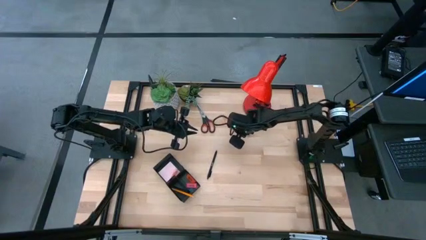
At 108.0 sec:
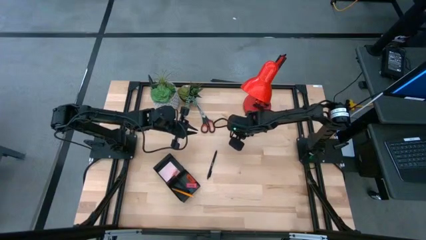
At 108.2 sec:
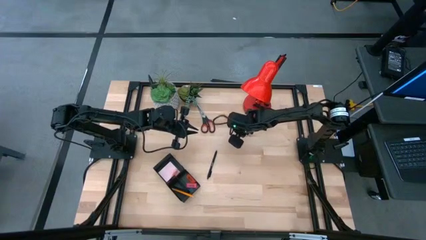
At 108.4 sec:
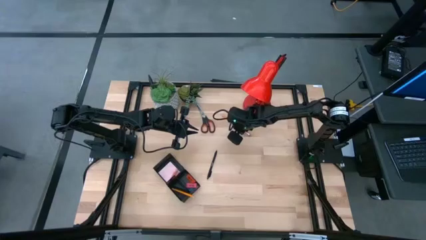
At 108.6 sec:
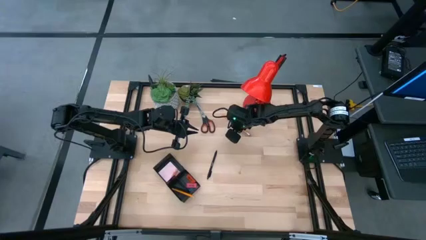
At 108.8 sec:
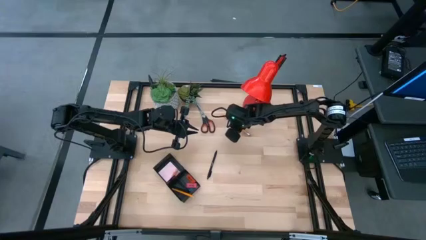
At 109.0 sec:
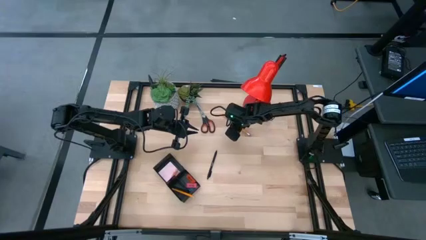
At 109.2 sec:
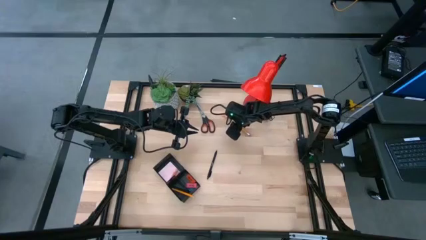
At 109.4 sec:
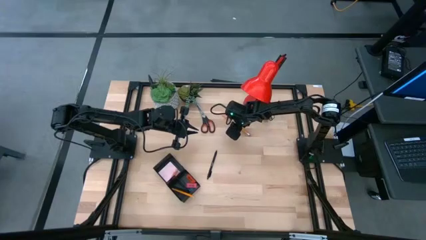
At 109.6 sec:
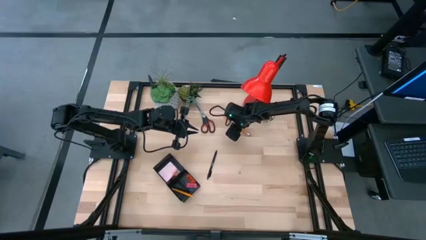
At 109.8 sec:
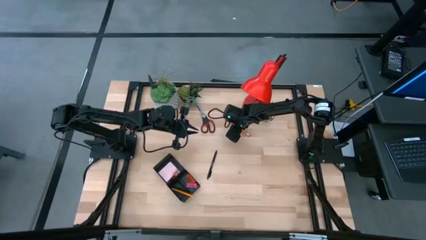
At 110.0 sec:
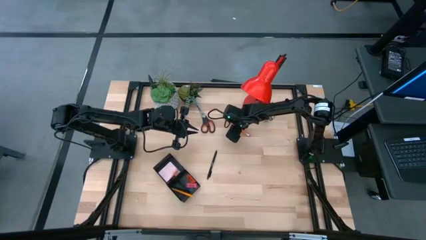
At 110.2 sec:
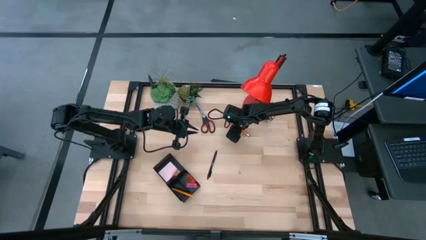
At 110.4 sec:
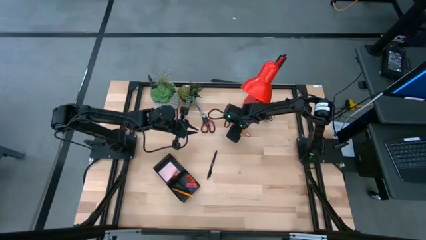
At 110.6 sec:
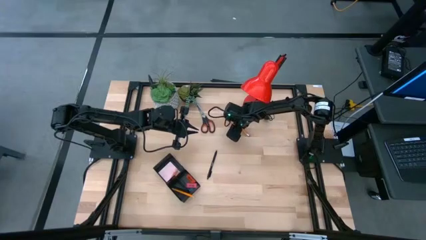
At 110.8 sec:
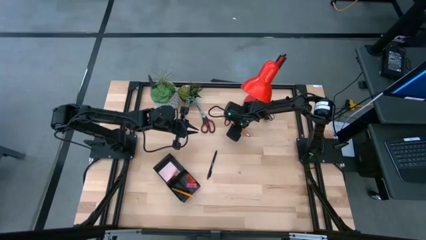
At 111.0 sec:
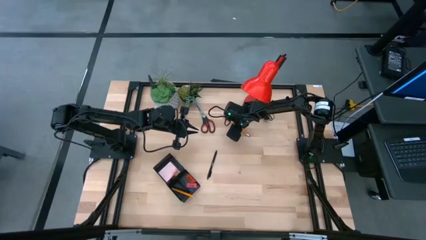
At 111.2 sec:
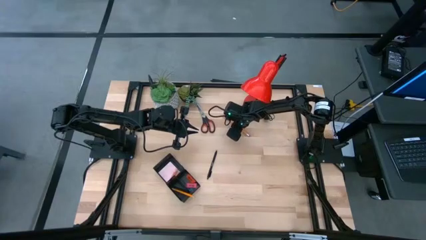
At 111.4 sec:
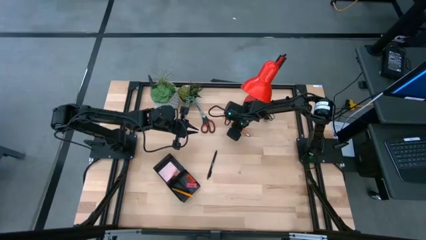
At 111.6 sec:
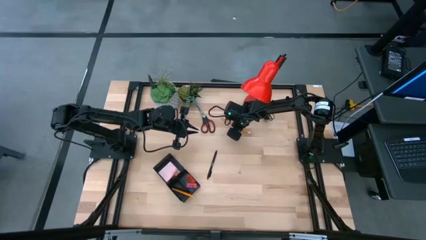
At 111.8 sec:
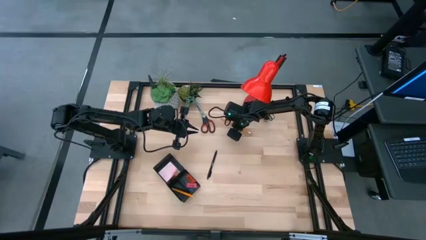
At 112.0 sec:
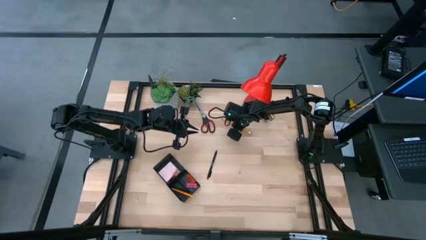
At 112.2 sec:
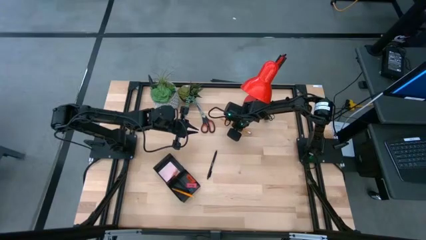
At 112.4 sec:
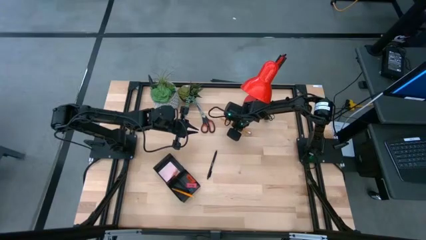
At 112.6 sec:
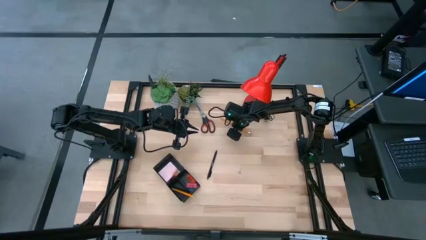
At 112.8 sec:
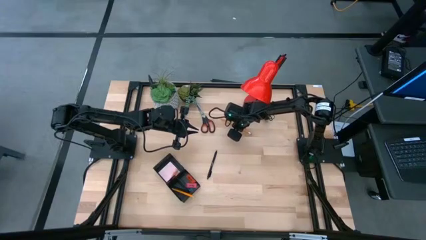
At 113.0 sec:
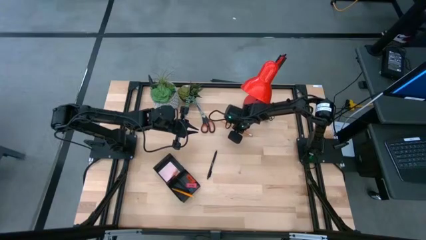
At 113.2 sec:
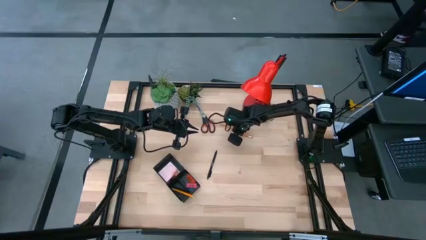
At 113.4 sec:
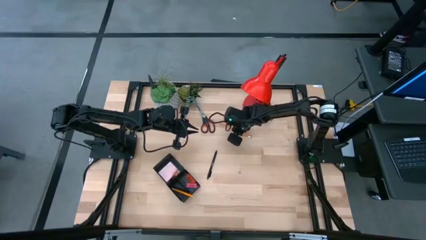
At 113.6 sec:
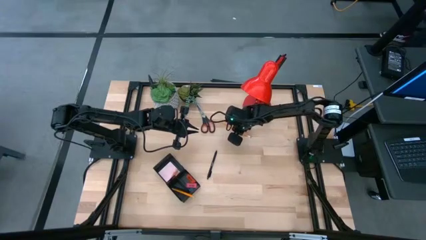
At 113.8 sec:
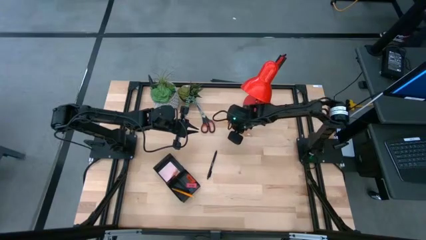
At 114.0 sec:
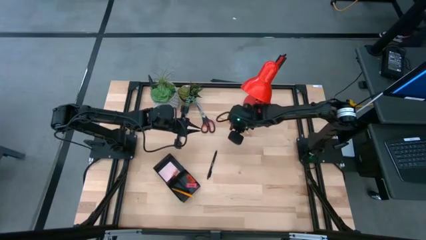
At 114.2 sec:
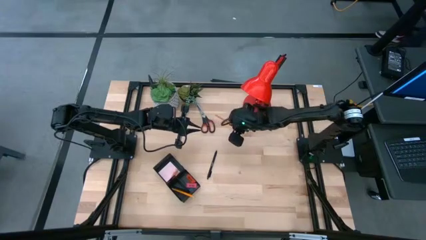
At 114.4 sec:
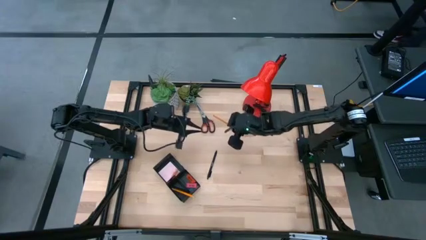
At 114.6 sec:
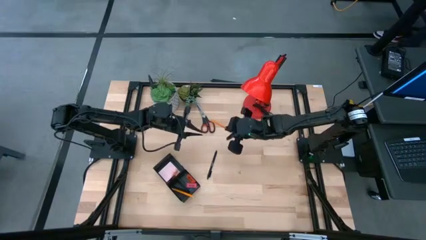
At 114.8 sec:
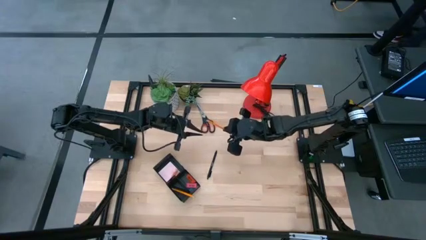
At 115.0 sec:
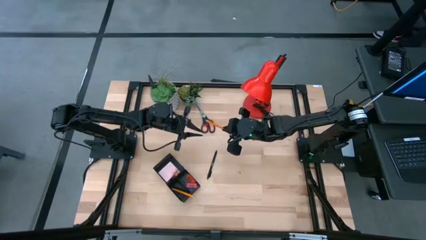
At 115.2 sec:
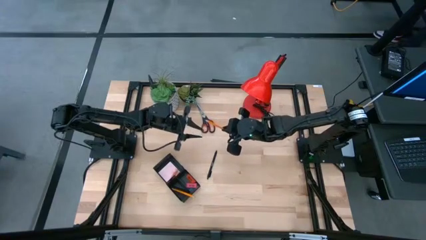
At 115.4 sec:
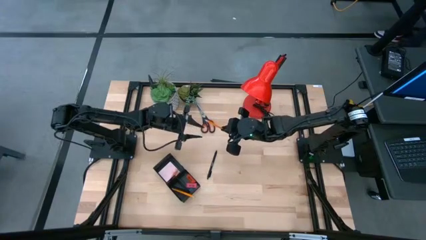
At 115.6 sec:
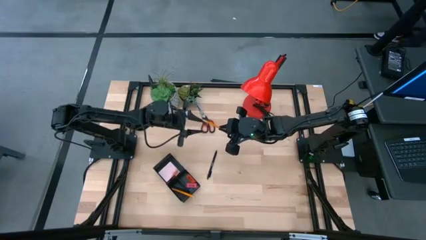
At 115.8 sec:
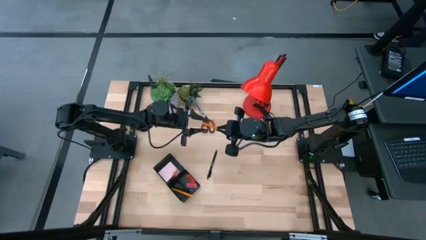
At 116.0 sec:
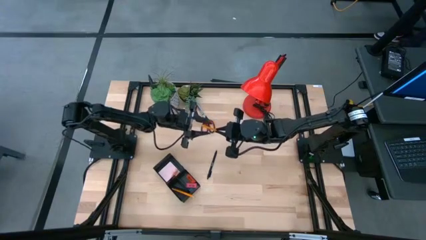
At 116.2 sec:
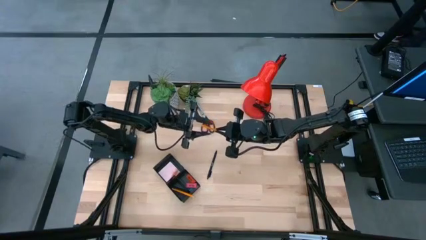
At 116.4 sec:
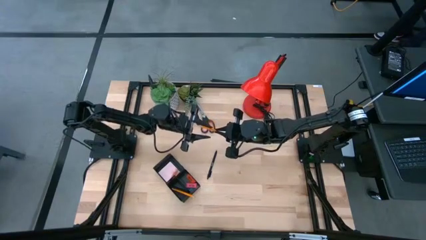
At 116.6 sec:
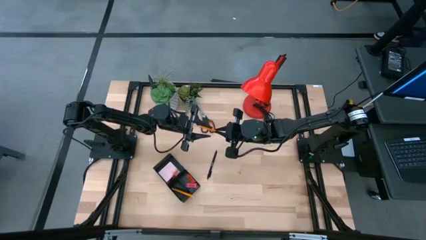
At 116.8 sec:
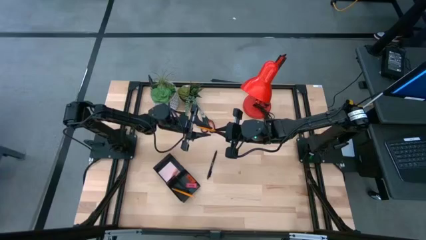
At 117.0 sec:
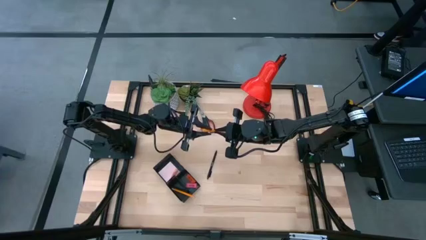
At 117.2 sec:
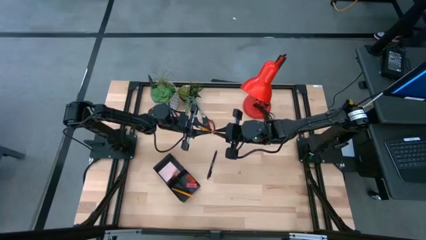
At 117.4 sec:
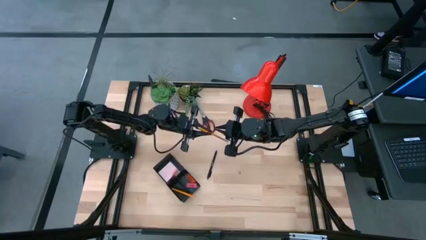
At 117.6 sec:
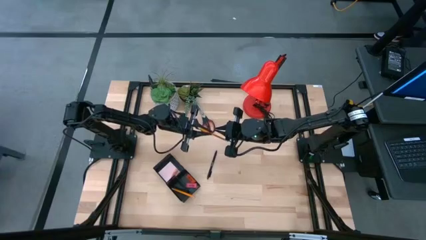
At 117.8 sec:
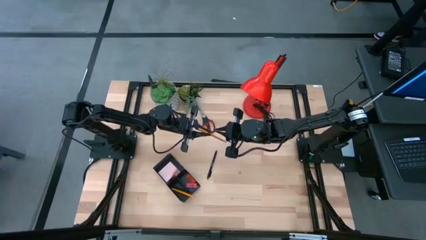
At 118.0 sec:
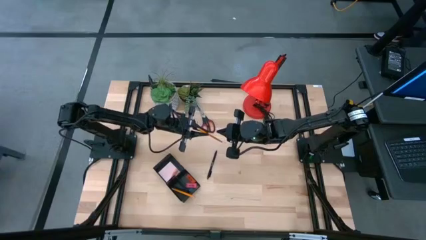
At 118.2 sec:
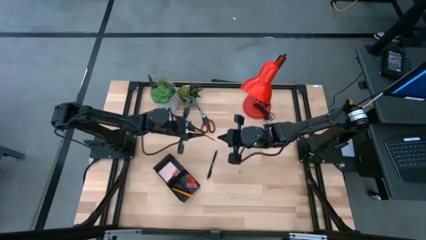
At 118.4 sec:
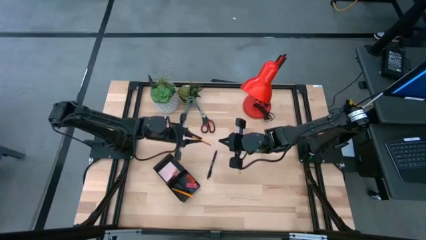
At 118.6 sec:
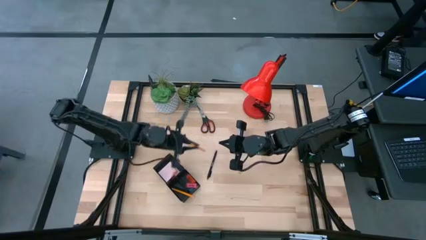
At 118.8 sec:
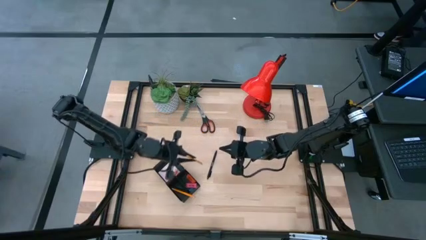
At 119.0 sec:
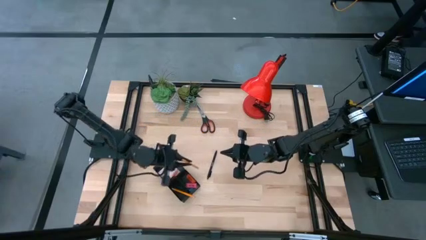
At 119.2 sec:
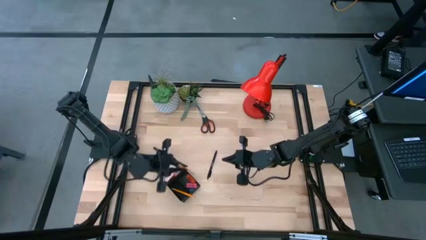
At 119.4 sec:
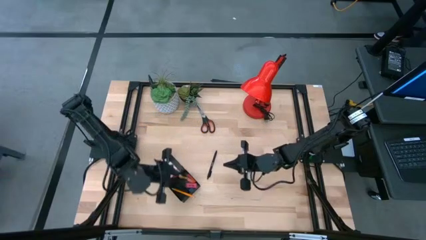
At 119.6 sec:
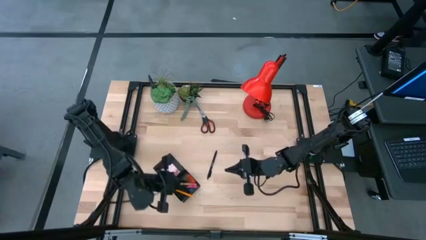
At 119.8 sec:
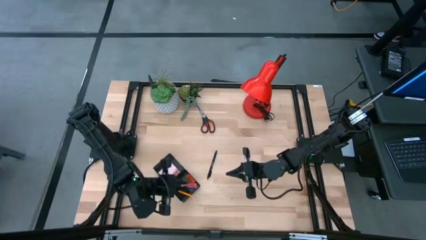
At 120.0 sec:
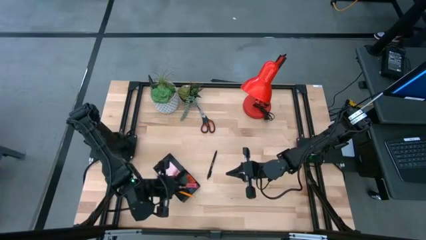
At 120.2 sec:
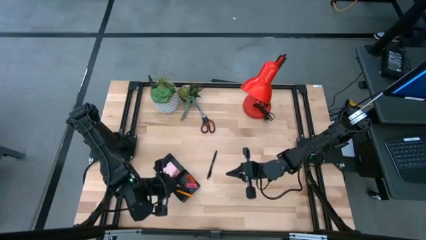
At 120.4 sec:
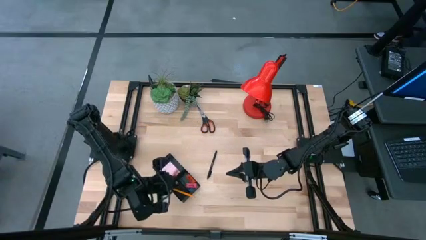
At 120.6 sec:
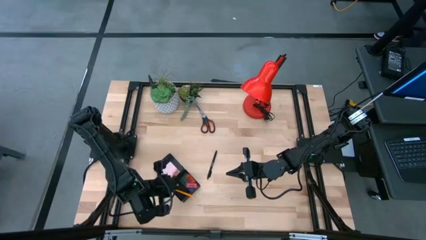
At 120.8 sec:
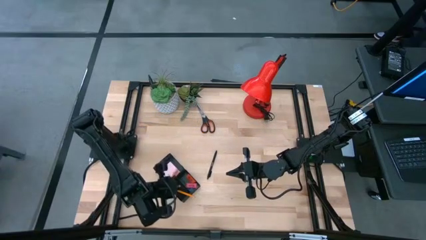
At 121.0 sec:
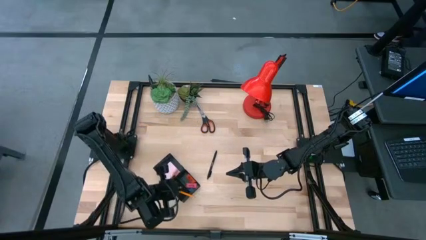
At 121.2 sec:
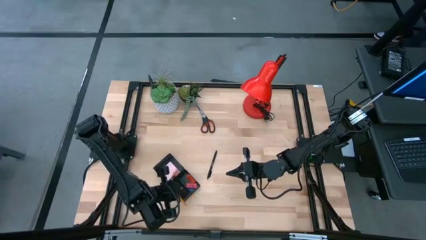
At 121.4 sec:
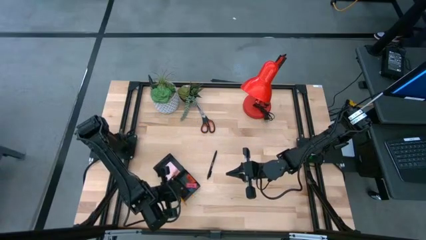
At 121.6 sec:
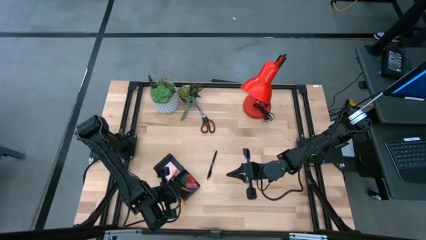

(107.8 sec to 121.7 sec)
Task: Pick and place office supplies into organizer
Put the yellow pencil into the black desk organizer
